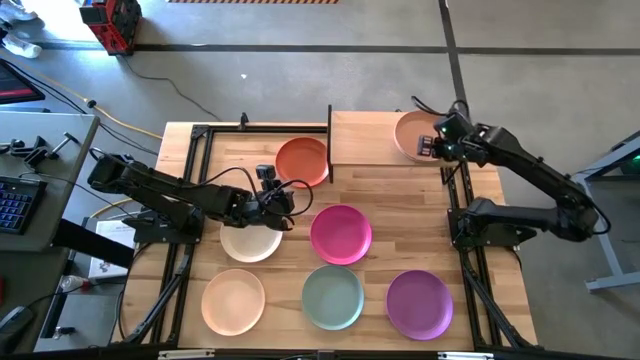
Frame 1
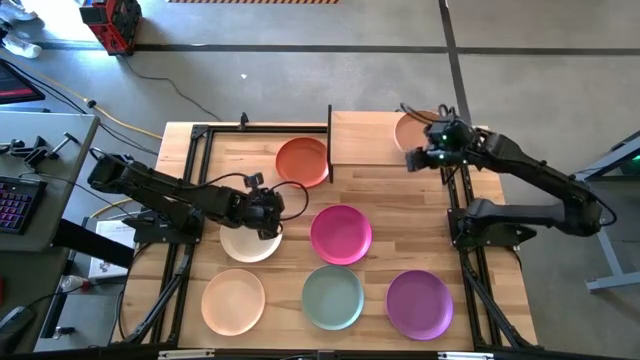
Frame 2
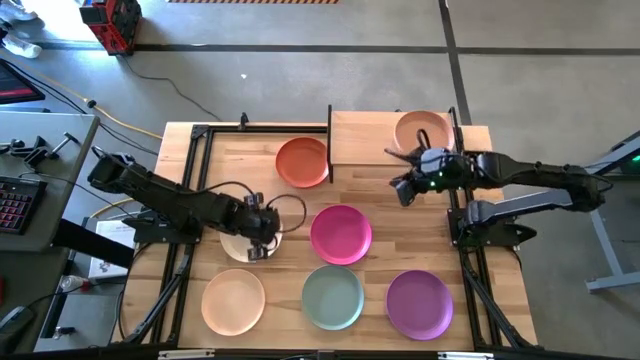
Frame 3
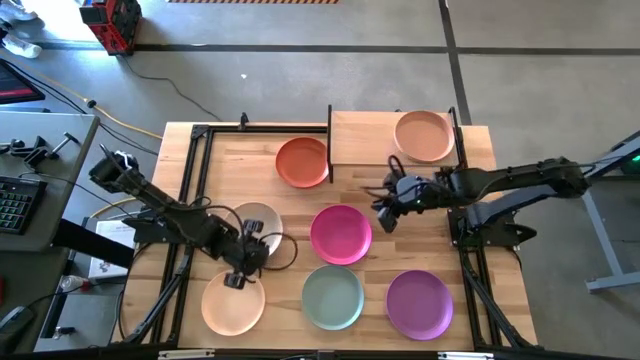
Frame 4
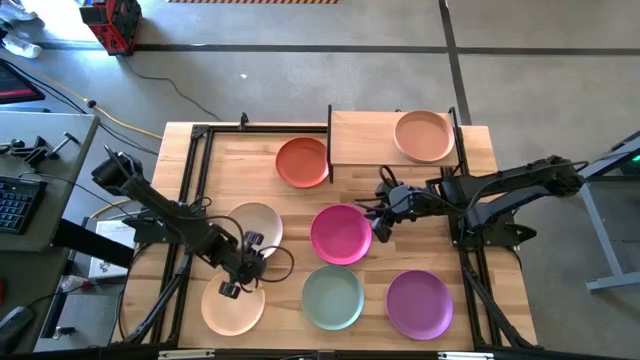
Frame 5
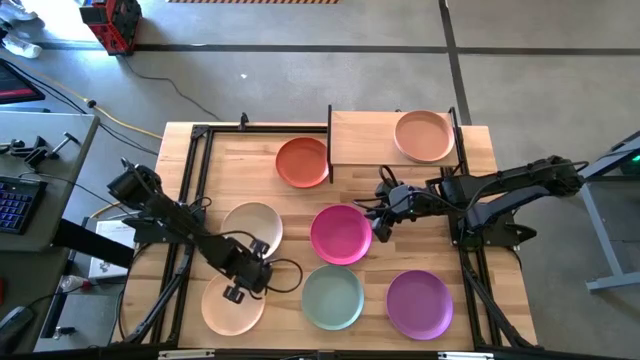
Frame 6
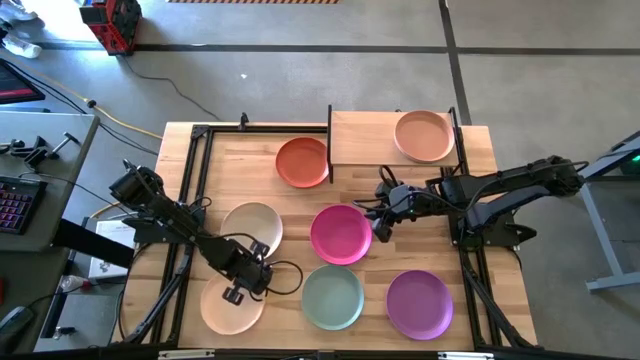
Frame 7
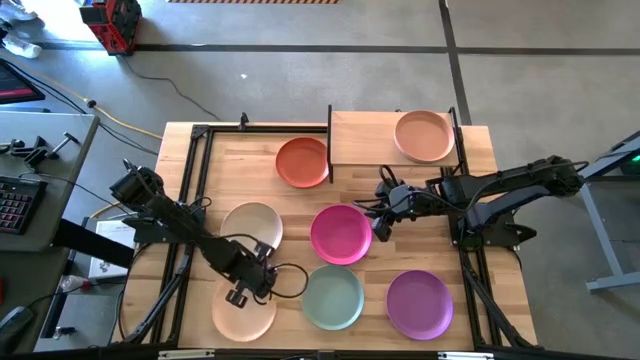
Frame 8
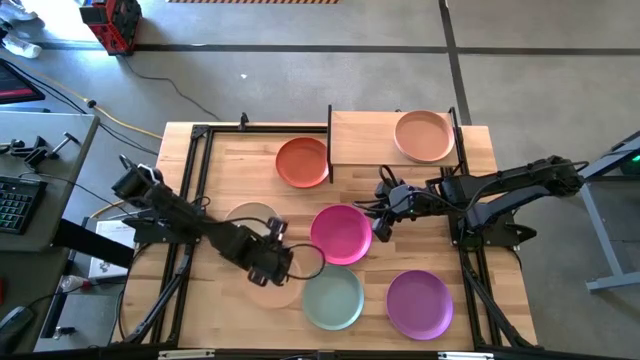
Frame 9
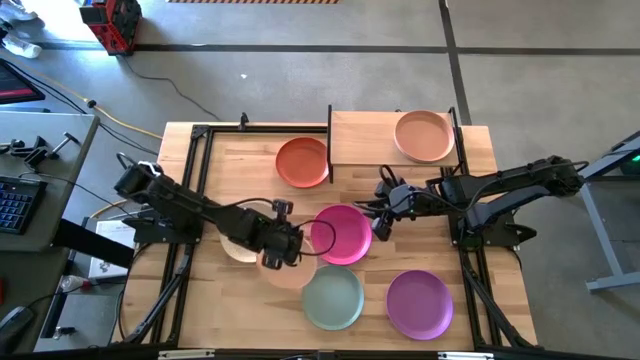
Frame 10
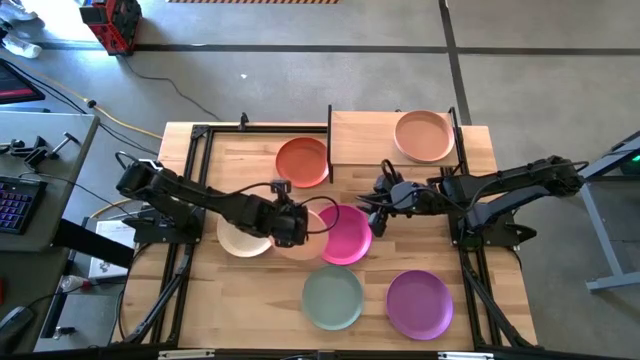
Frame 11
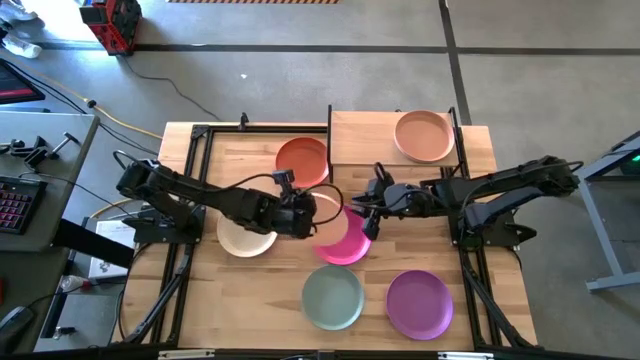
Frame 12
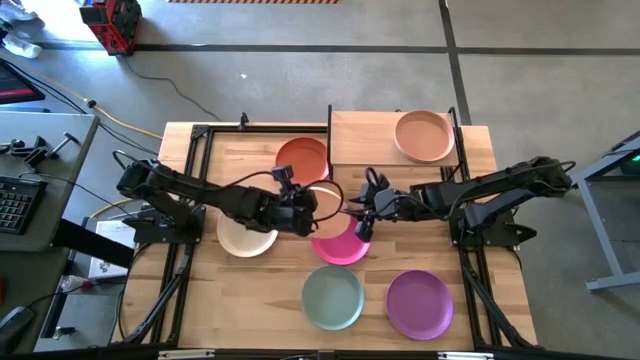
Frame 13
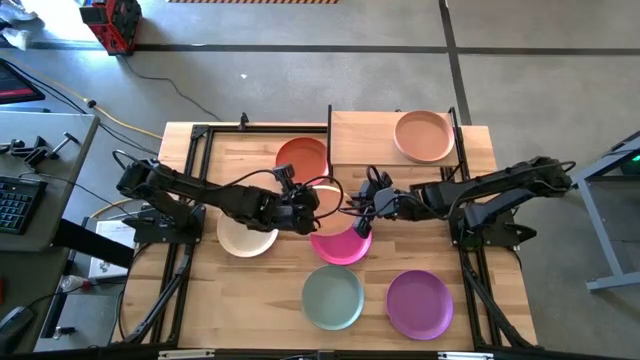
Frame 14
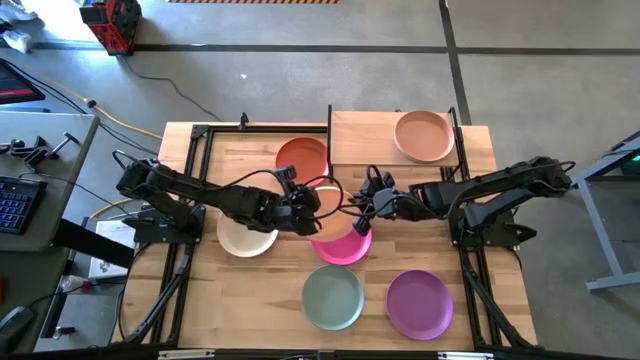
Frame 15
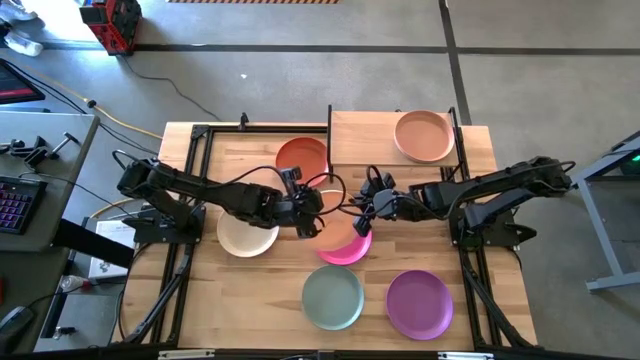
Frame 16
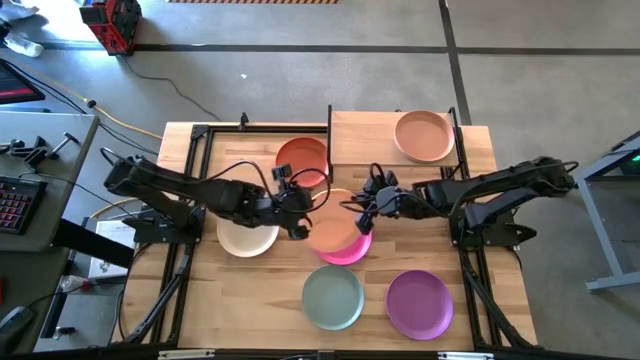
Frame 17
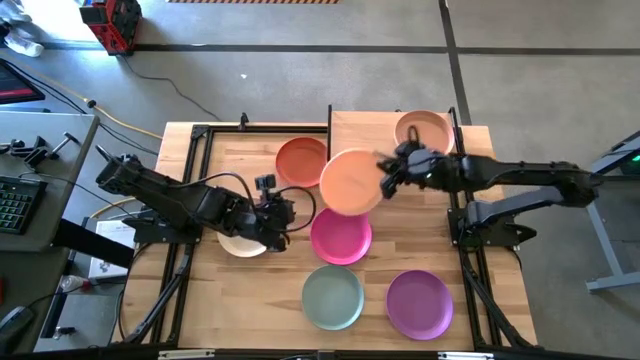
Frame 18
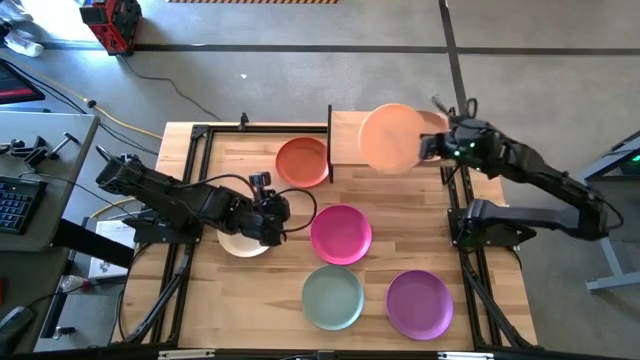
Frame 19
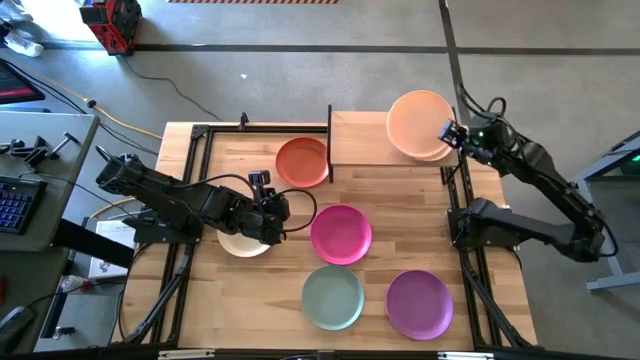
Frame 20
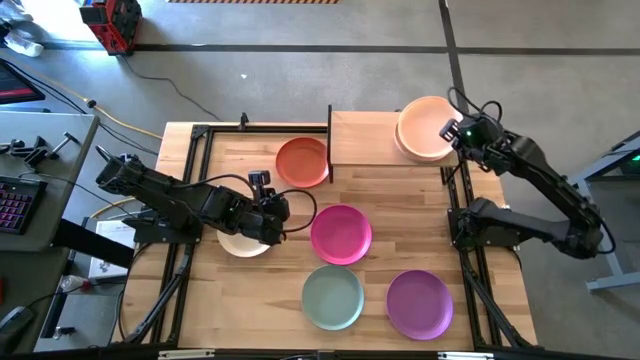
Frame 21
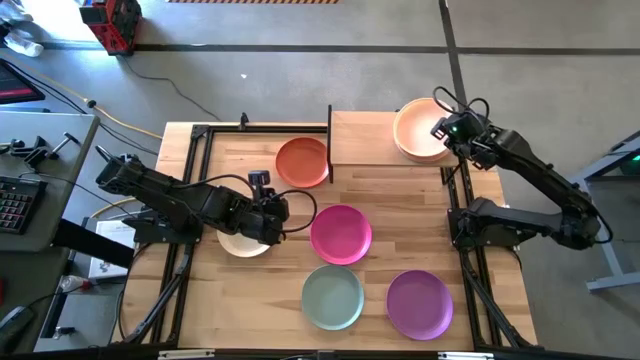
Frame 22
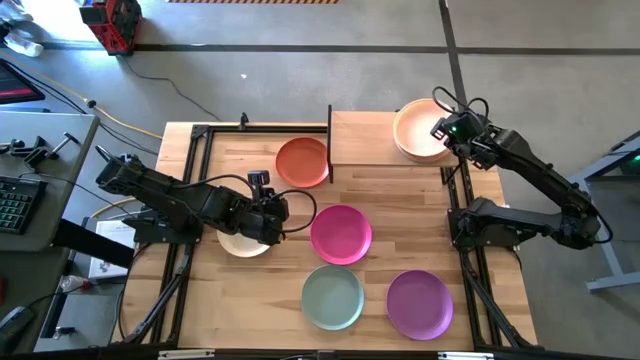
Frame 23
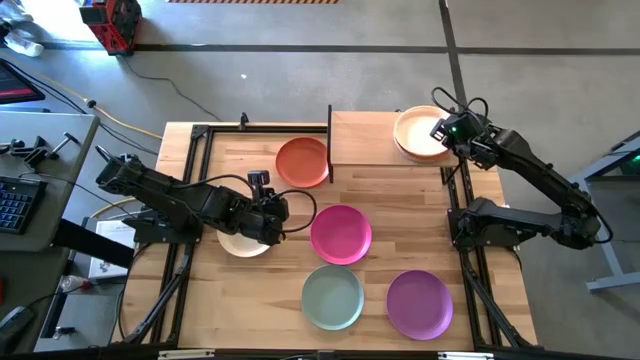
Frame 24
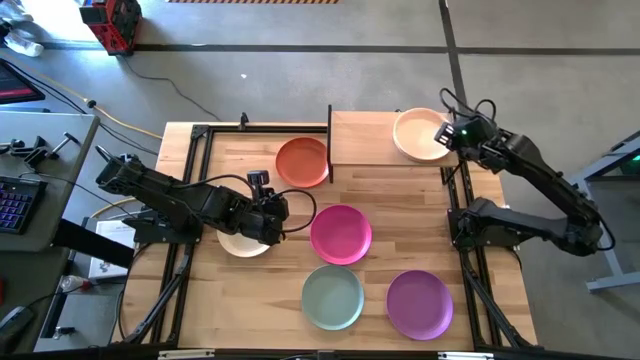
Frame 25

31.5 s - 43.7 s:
Task: Place and stack plates onto a shelf
Stack the peach plate on top of the light orange plate on the shelf
